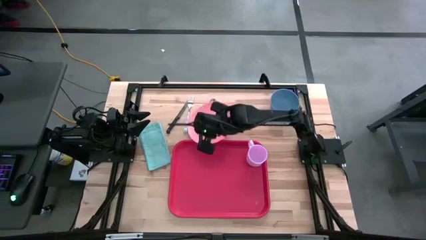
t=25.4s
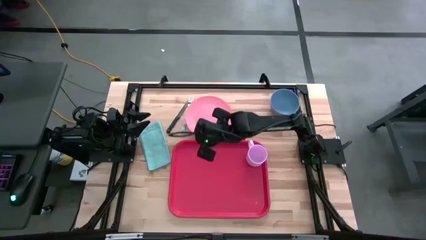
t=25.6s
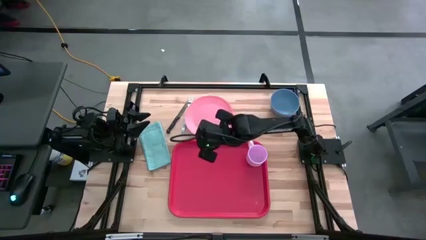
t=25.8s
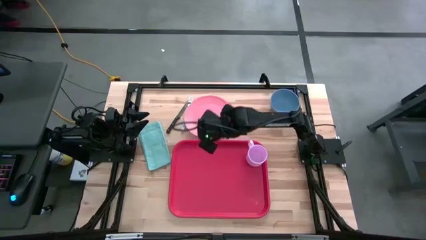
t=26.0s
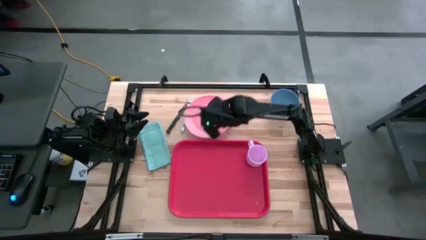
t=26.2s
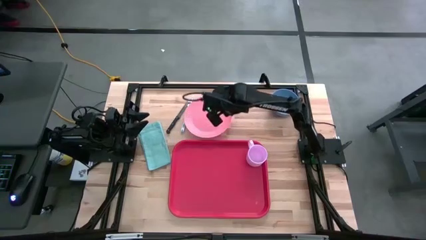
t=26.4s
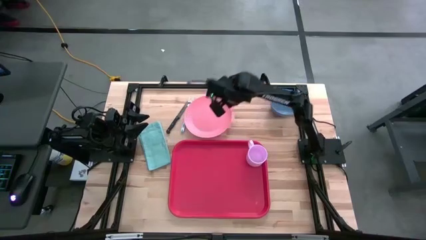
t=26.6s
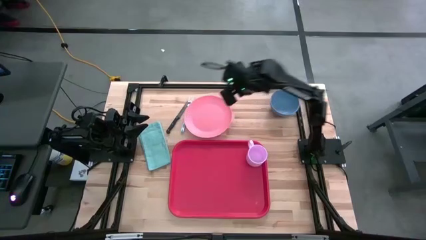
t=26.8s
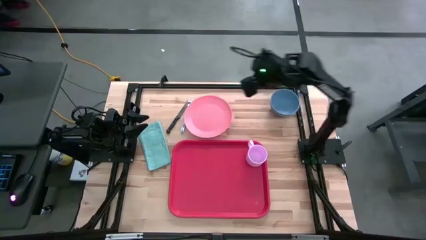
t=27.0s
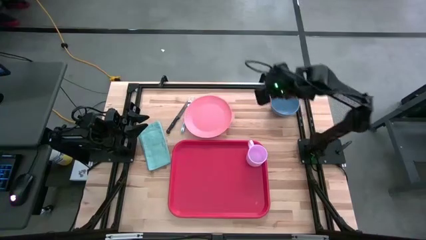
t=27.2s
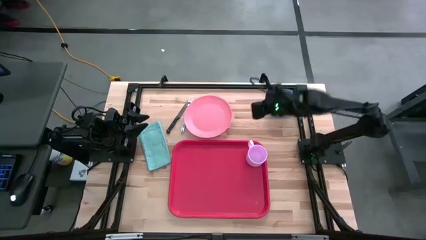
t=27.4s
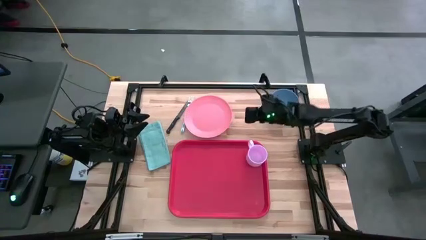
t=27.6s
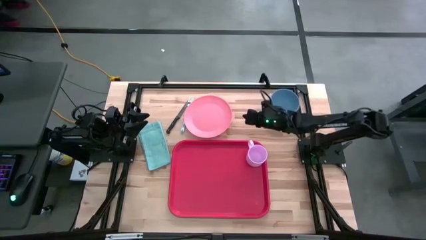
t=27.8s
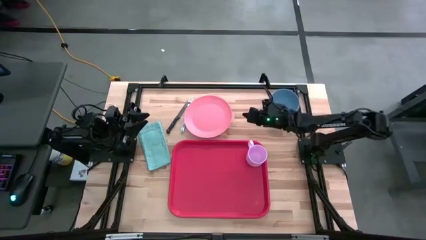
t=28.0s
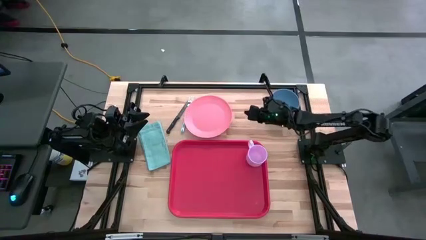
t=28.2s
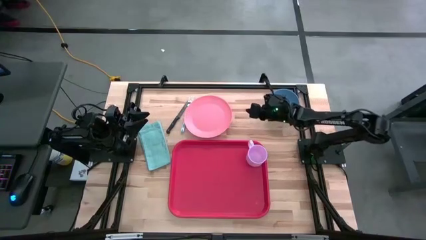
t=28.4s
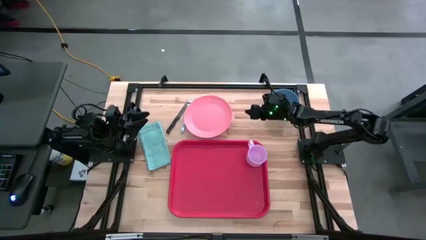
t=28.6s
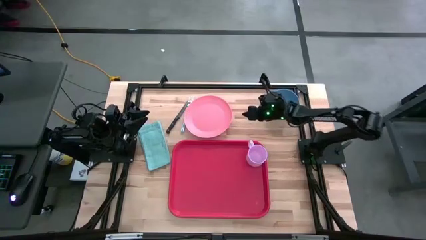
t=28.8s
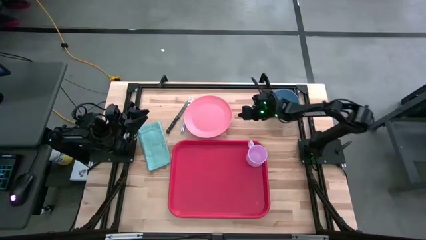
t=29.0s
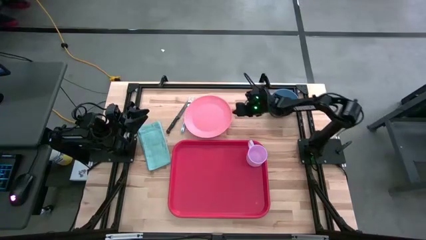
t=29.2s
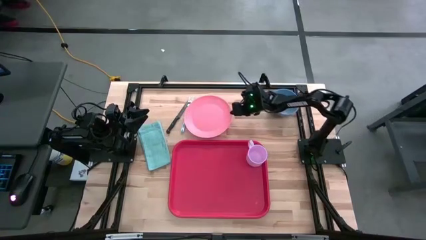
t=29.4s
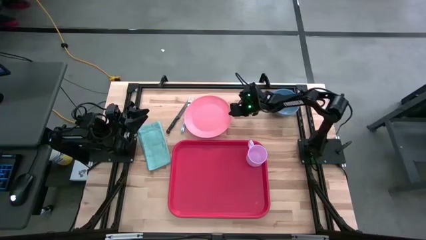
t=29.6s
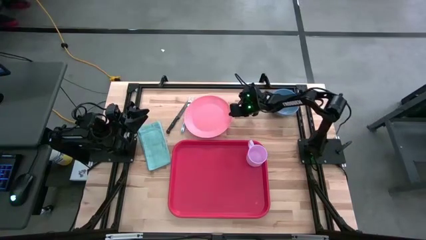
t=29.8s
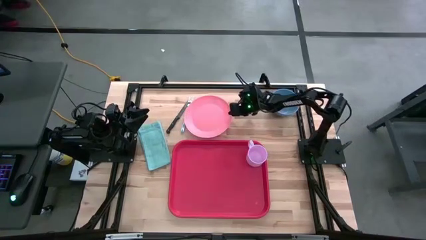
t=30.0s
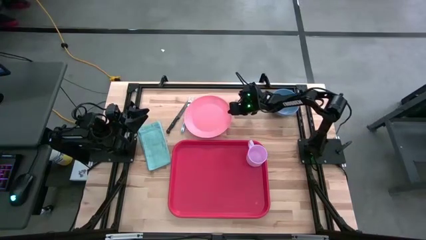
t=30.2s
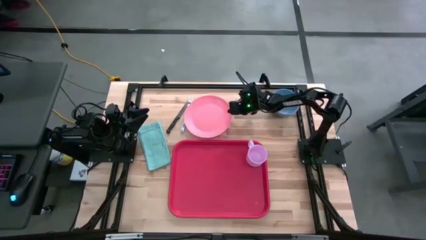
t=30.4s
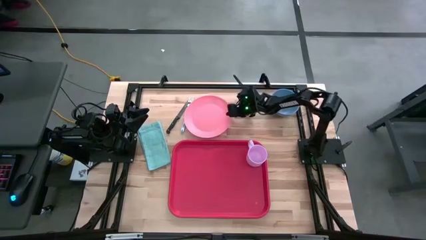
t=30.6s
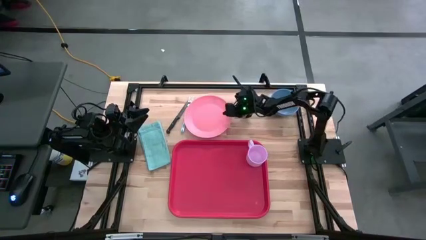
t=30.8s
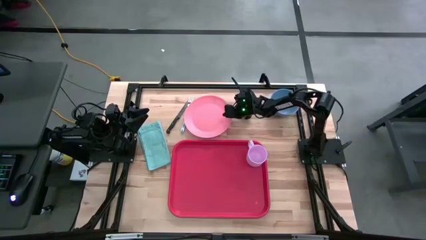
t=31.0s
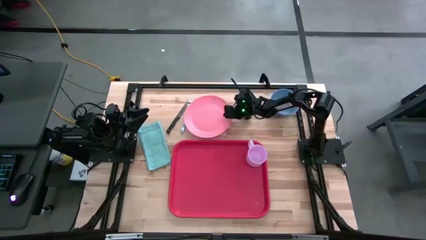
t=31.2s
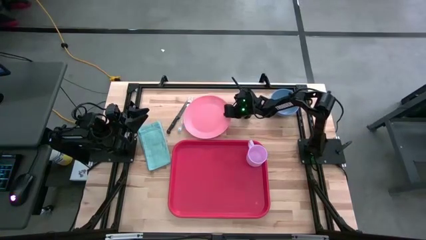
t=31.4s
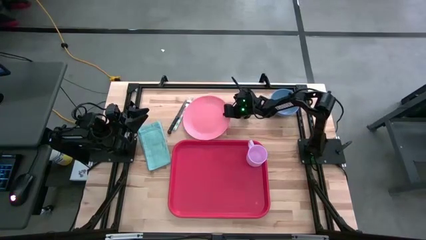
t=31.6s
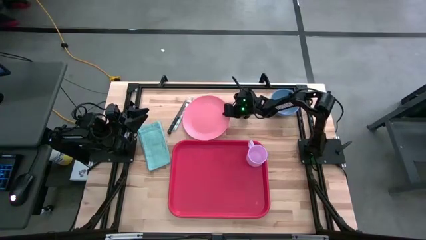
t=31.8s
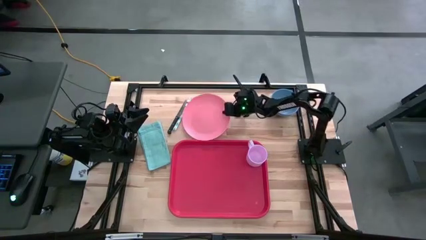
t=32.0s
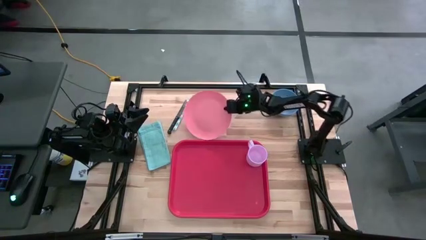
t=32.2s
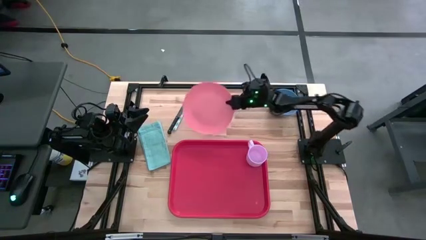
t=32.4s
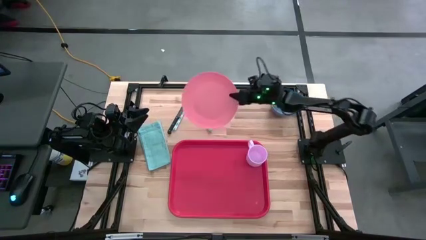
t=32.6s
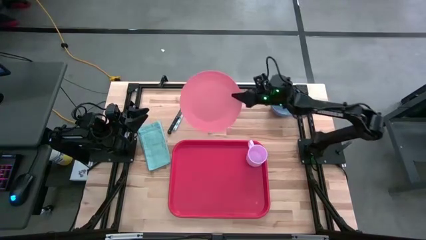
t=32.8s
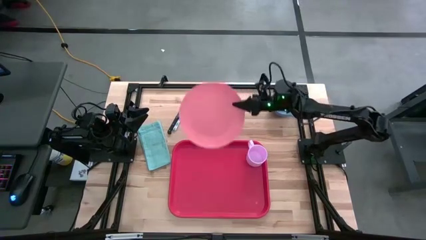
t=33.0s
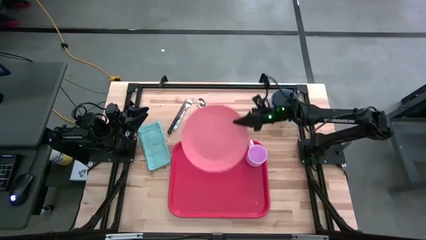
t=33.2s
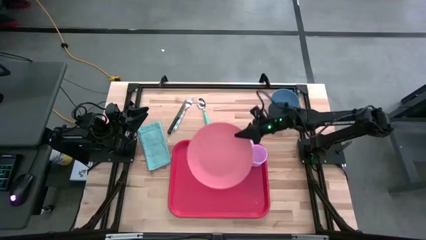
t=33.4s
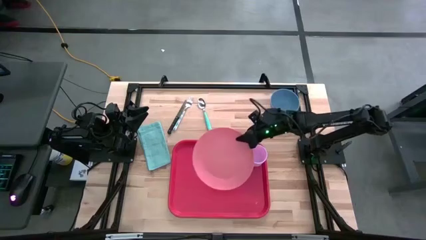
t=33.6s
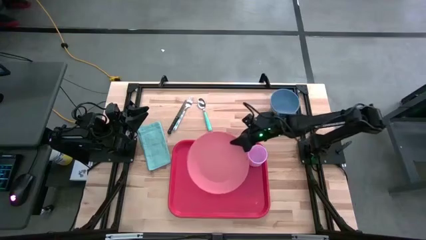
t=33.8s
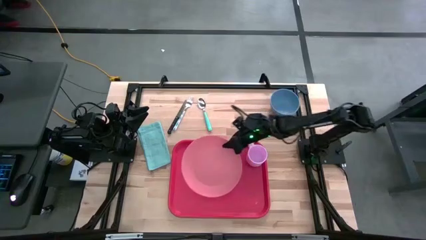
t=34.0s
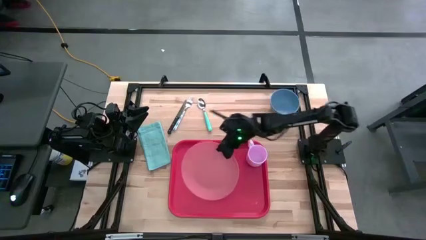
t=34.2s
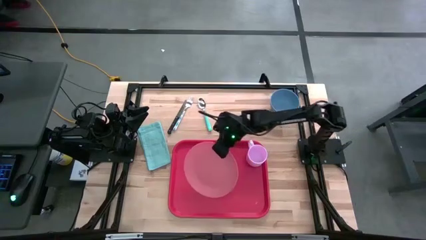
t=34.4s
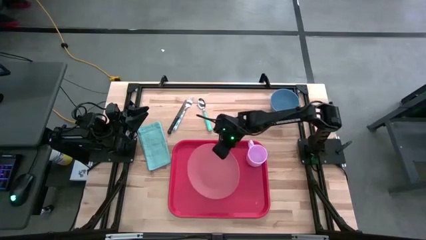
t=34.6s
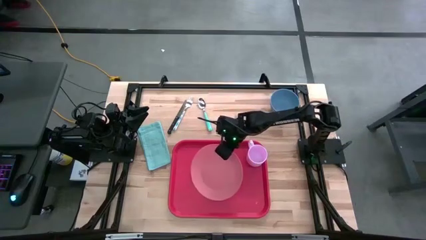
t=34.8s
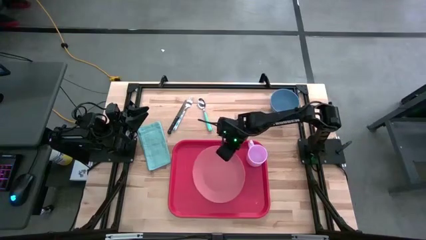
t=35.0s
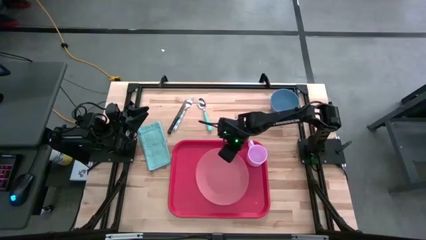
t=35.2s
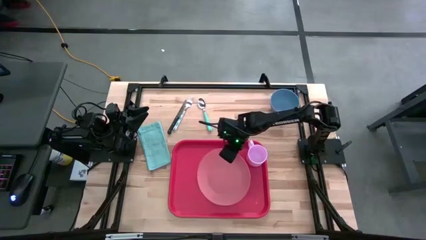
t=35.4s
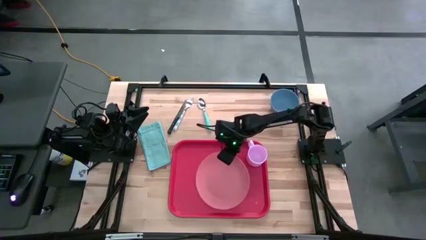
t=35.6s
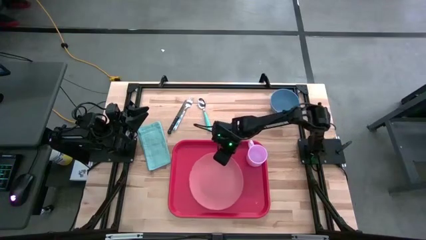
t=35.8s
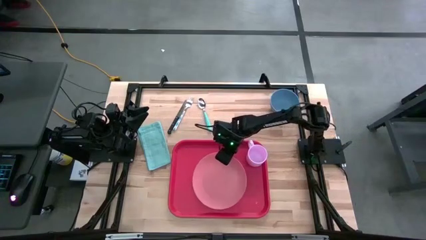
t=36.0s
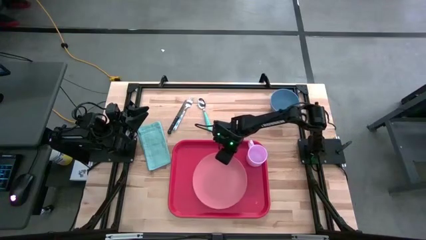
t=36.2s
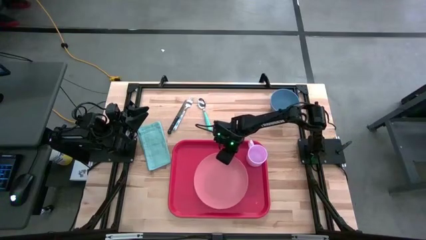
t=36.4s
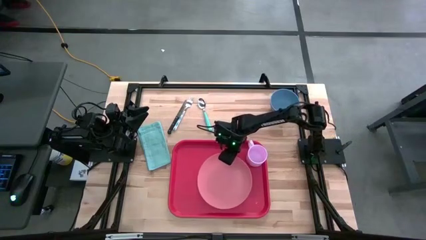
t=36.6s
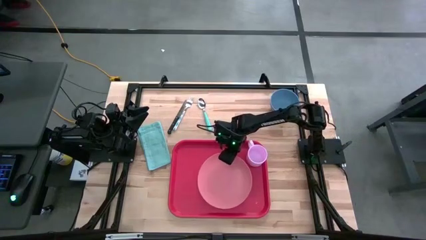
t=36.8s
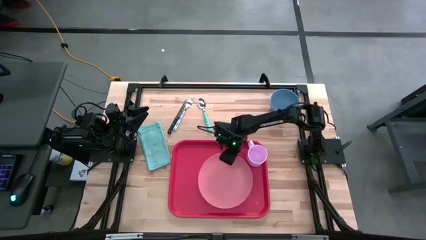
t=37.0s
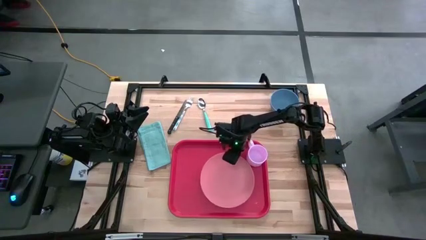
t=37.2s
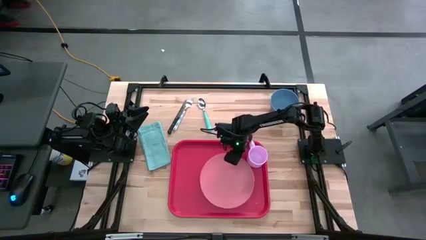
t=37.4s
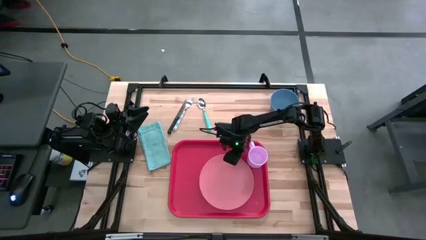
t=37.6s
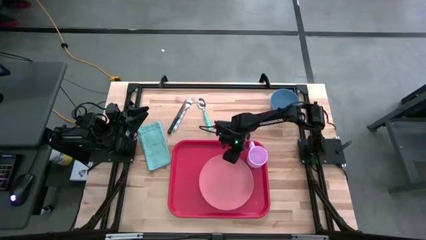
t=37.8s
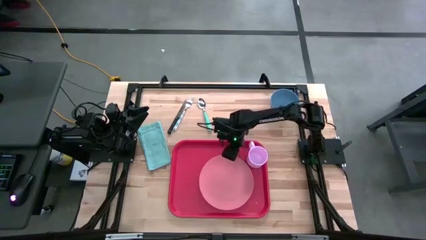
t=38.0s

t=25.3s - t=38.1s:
Task: Set up tray
Put the pink plate on the red tray to the bottom left of the purple mug

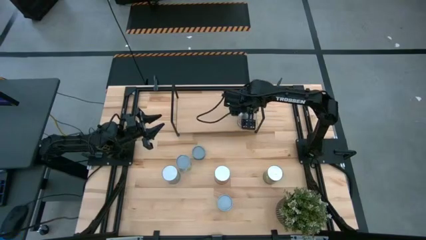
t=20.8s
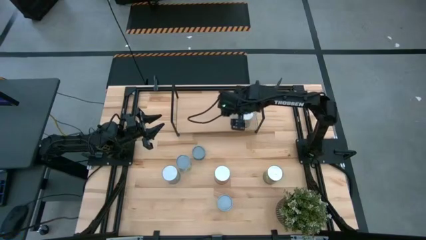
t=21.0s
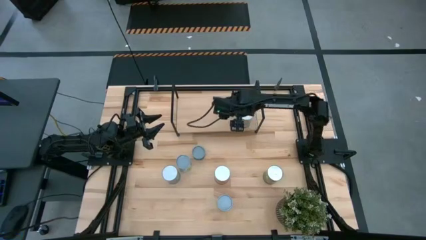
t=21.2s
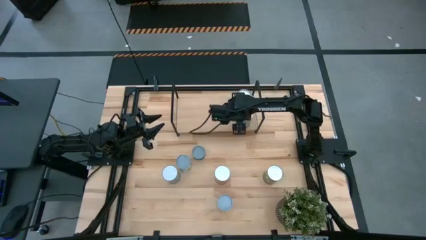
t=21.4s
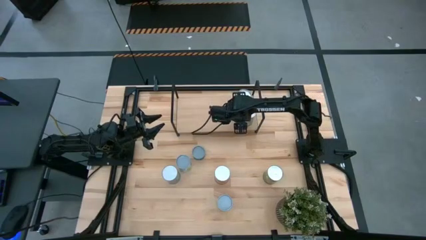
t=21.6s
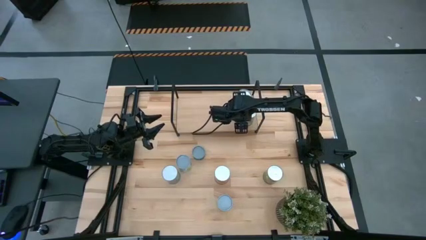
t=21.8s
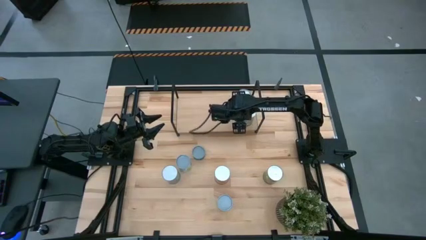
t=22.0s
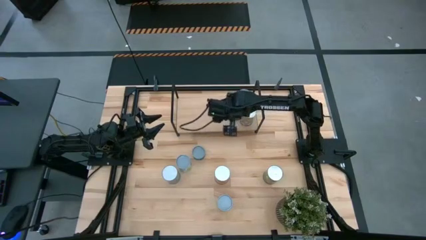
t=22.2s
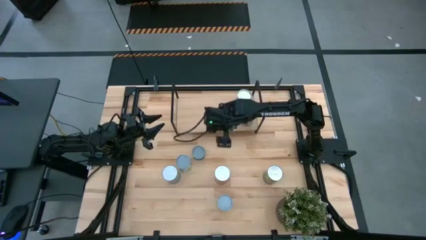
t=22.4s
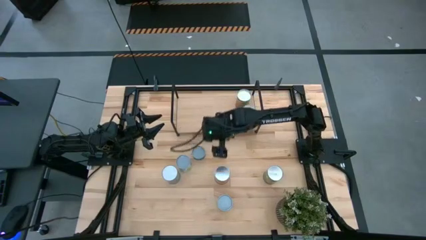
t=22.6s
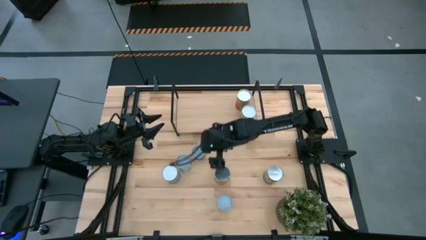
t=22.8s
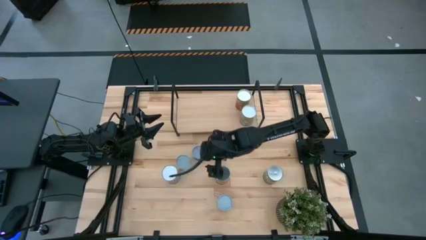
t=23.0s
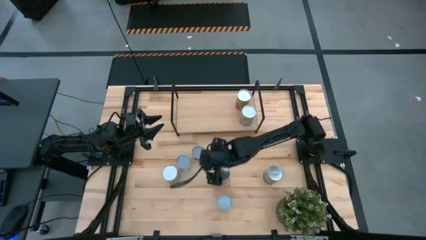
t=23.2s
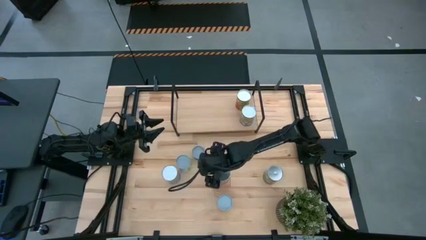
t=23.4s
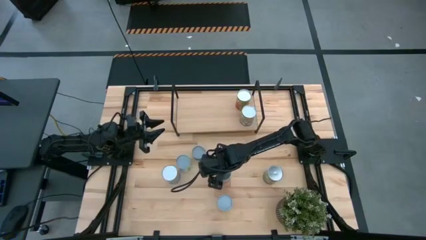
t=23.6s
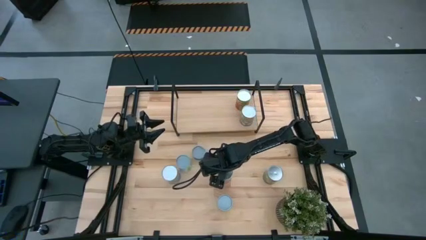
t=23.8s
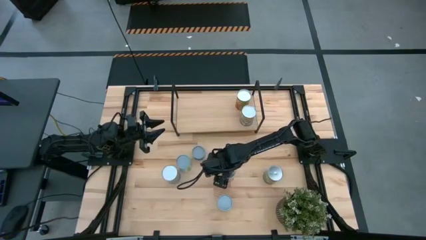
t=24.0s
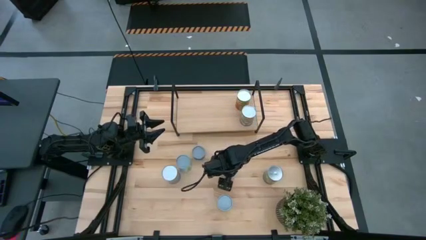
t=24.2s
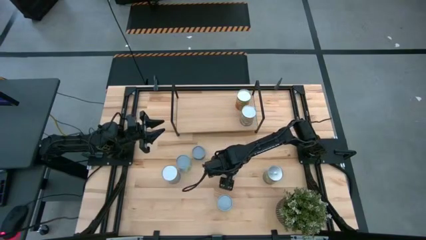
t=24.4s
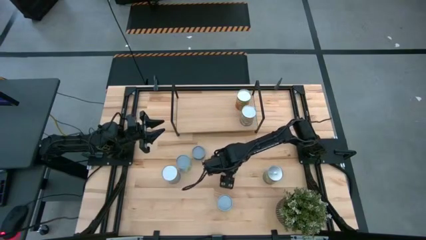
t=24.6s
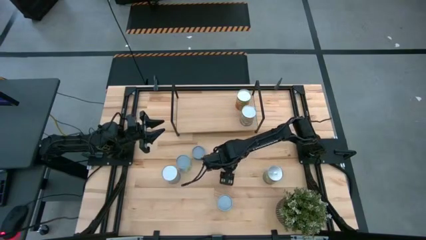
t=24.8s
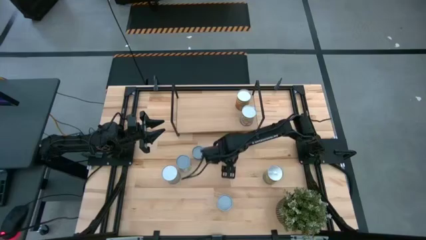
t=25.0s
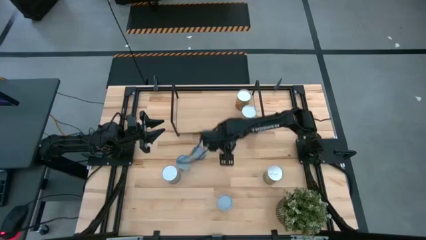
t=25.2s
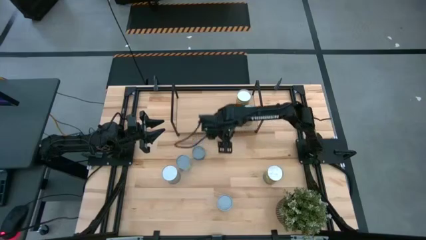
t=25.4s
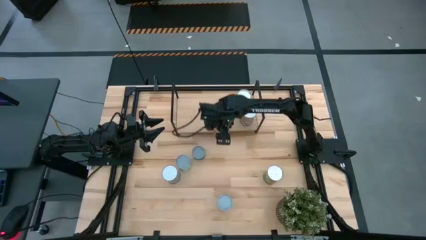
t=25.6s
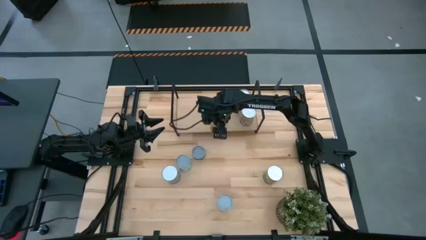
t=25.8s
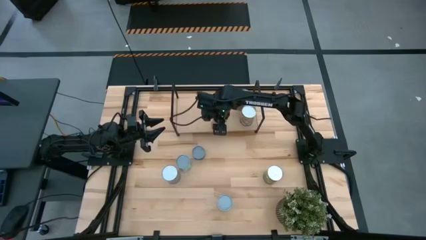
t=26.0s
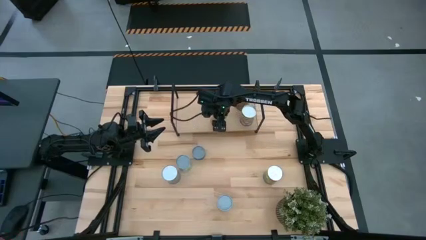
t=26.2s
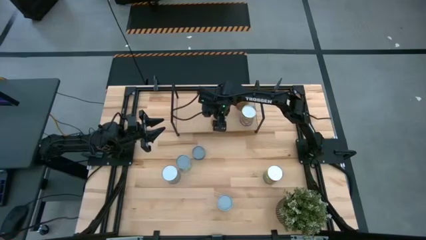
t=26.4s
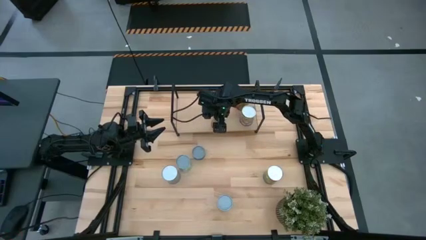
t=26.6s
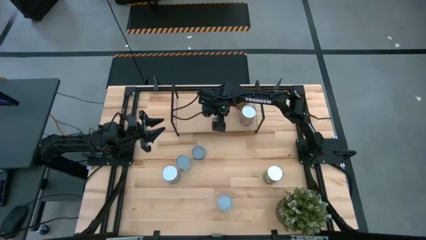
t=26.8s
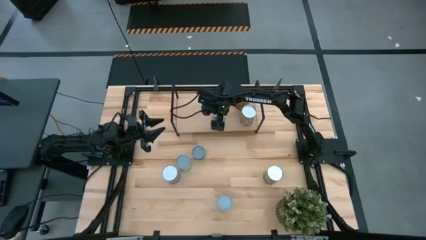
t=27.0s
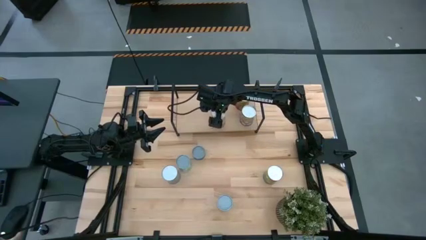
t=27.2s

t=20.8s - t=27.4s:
Task: Pick and place cans onto a shelf
Put the canned corn on the shelf
